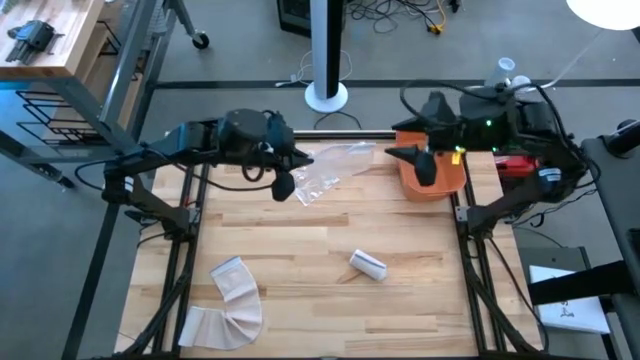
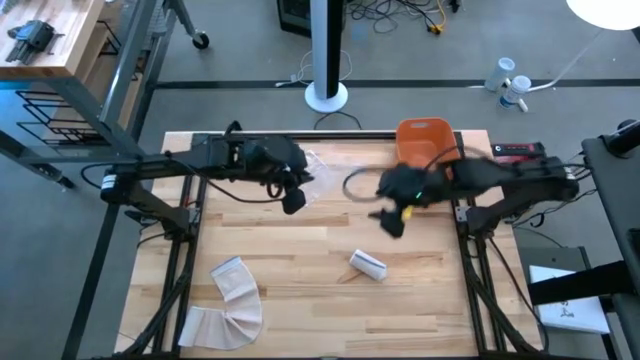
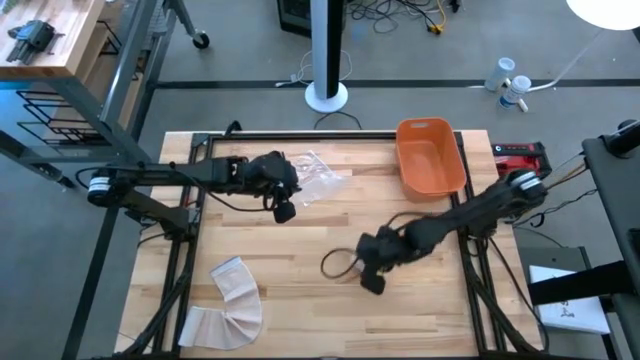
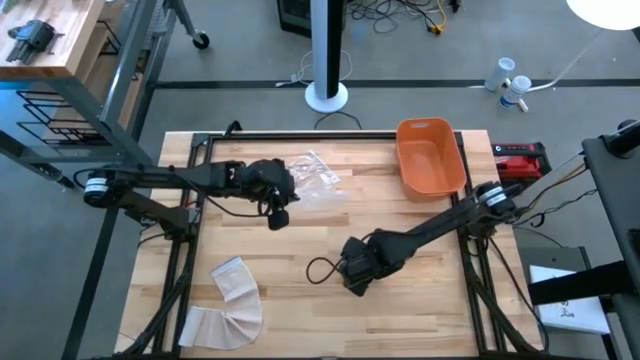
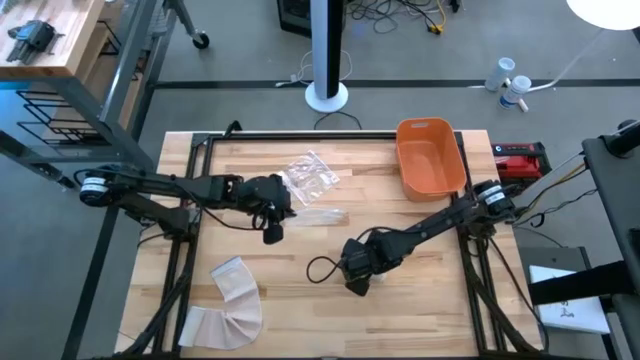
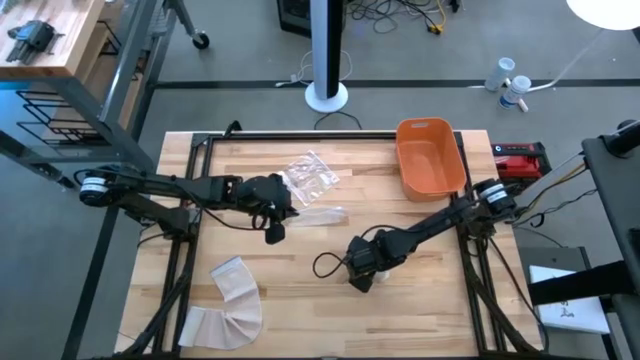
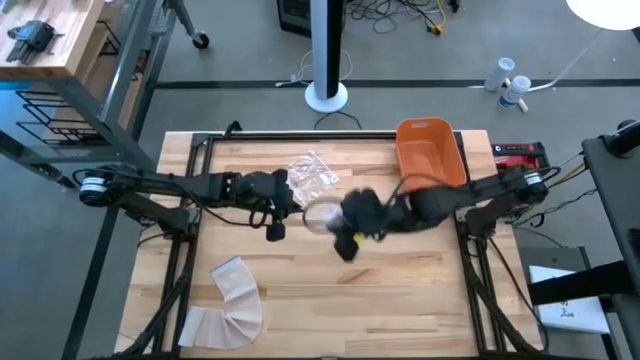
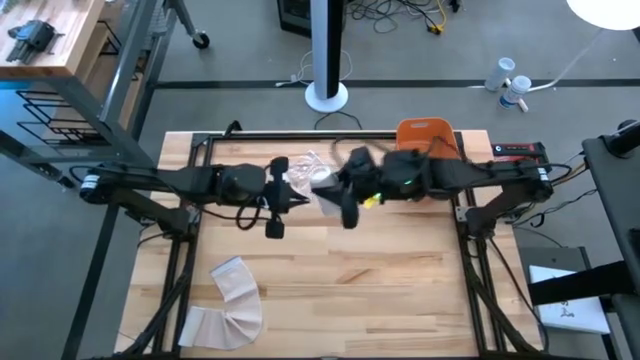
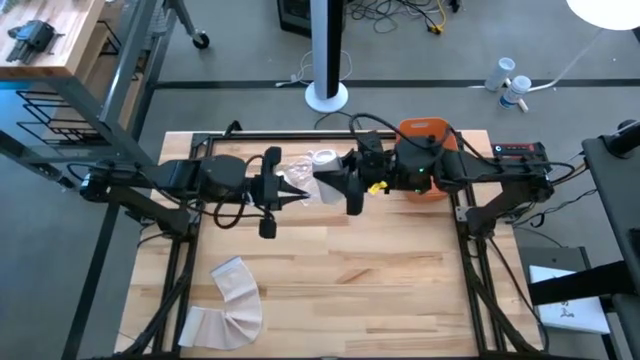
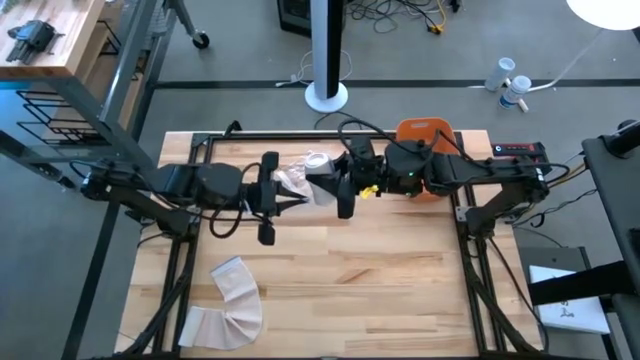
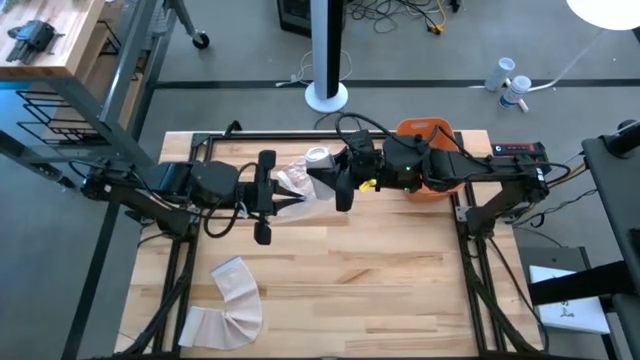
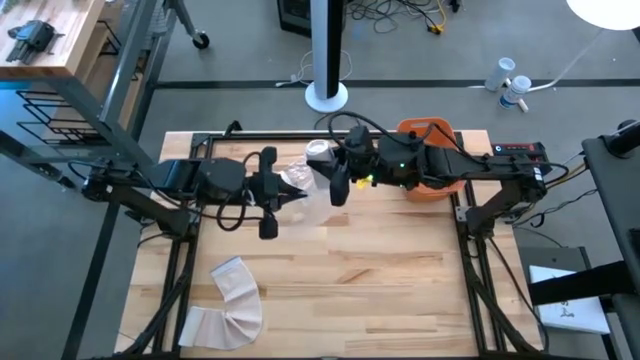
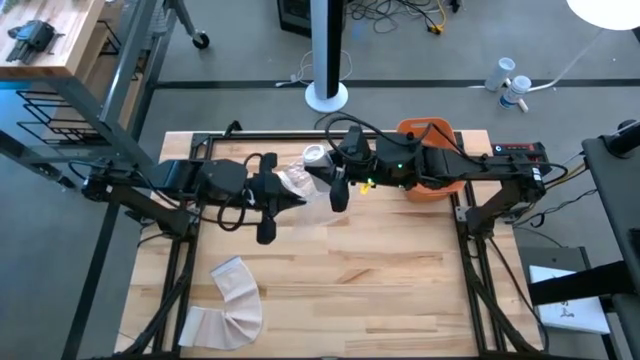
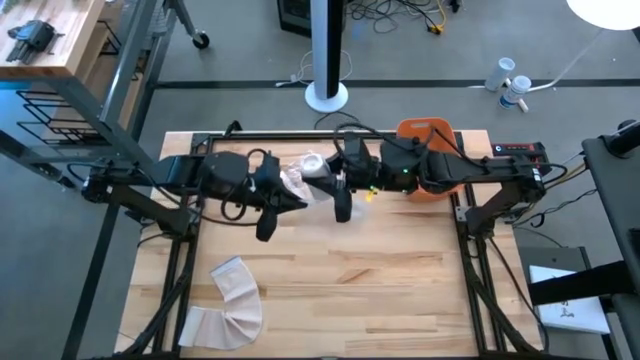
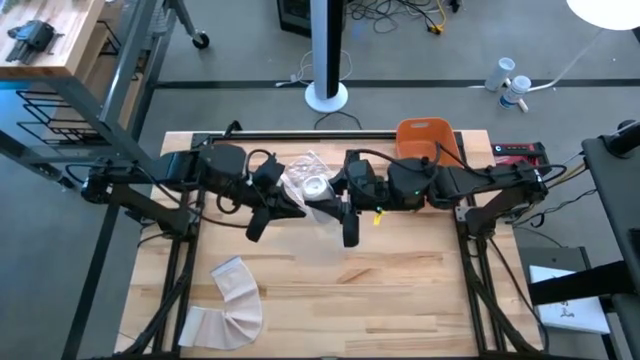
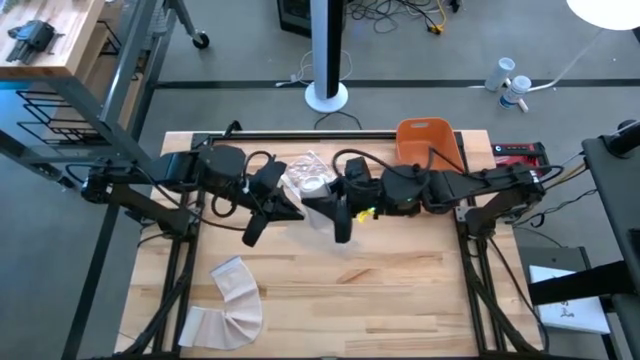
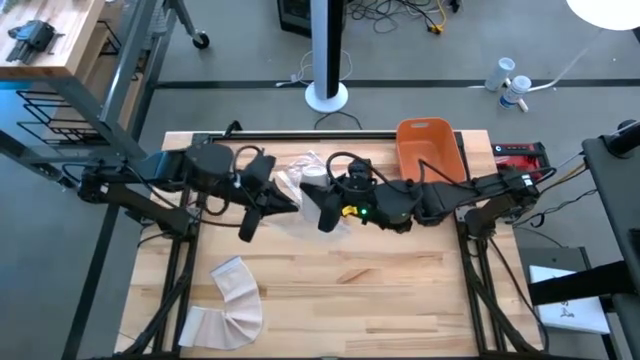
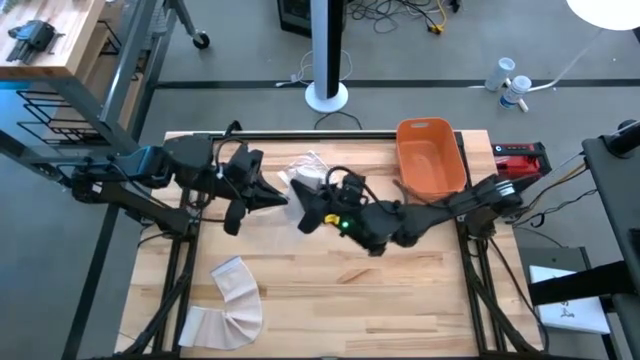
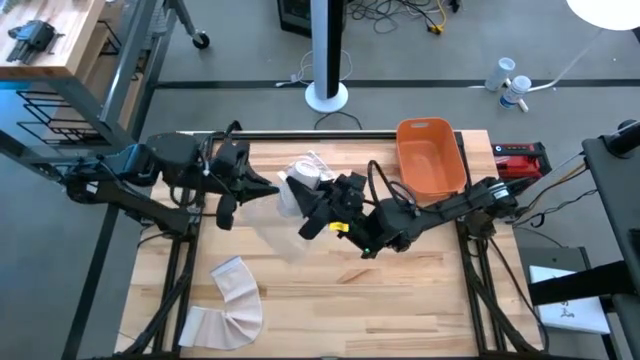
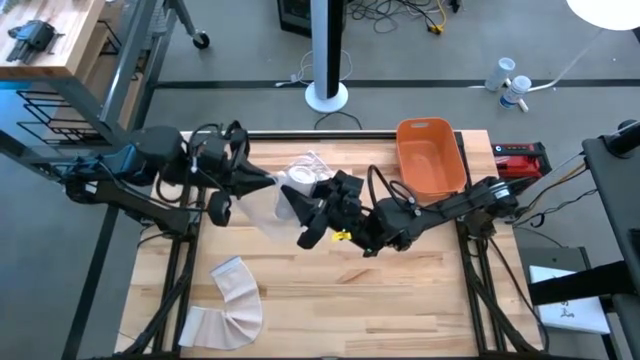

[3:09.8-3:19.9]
Task: Roll bandage
Put the center rolled brown bandage into the transparent zip bag

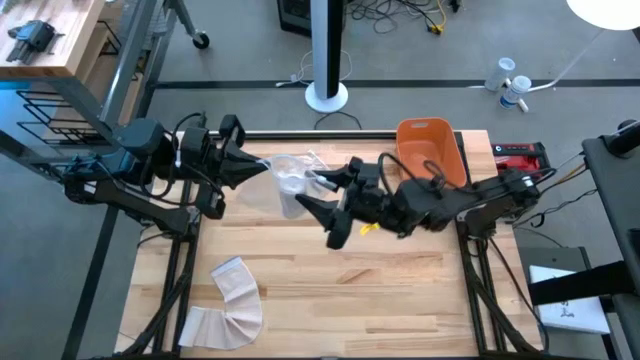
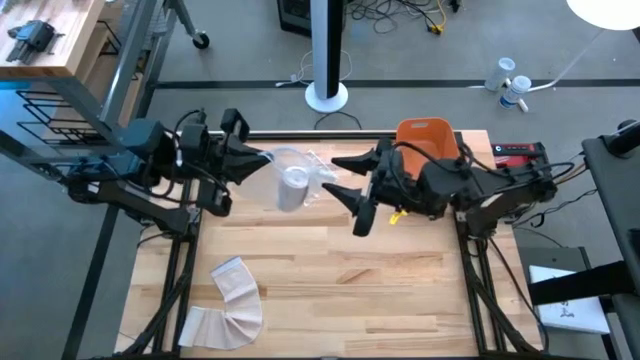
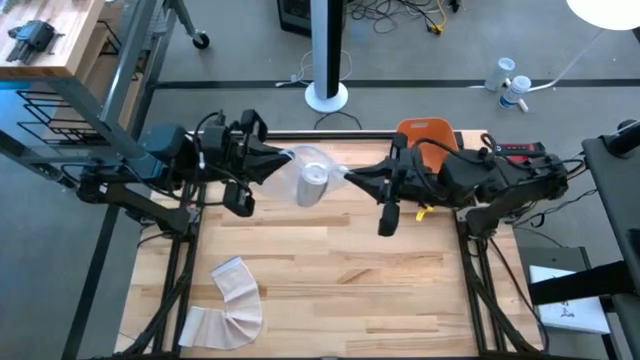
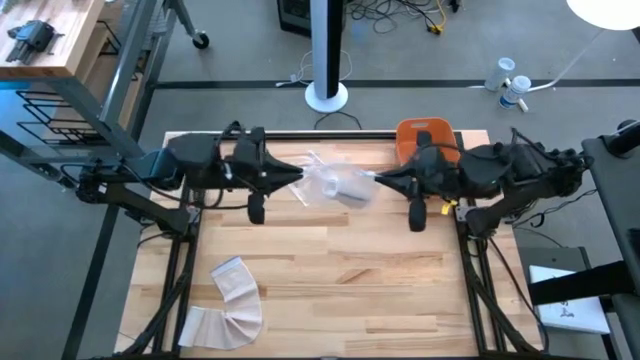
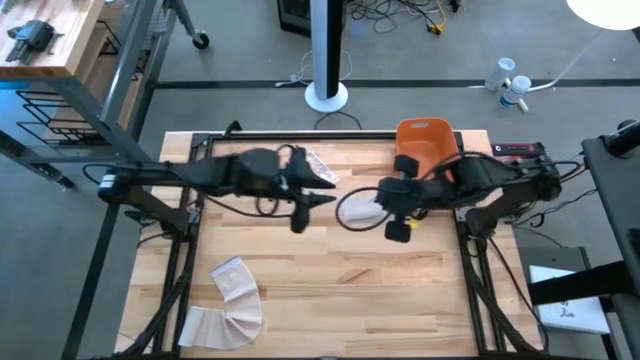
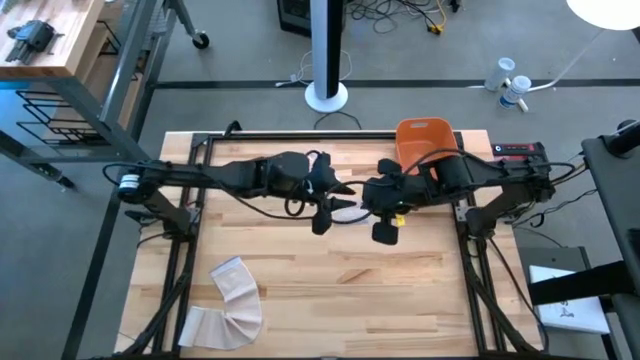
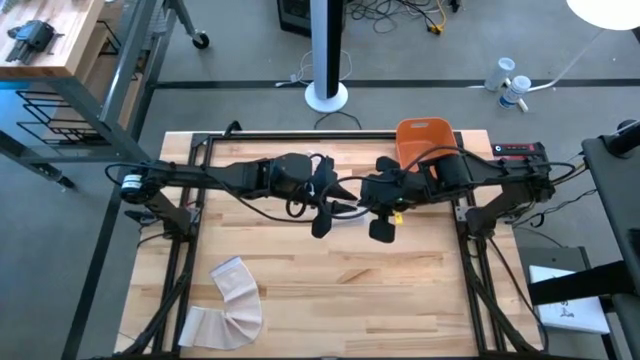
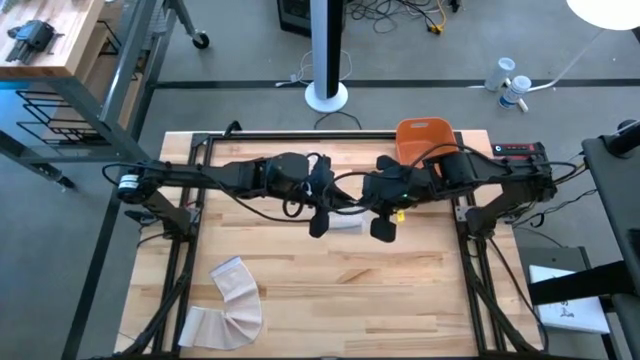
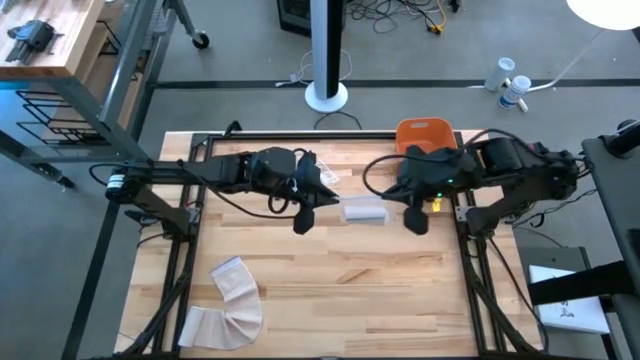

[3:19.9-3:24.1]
Close the transparent zip bag

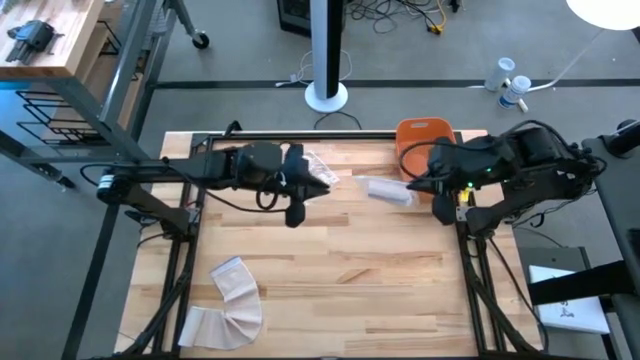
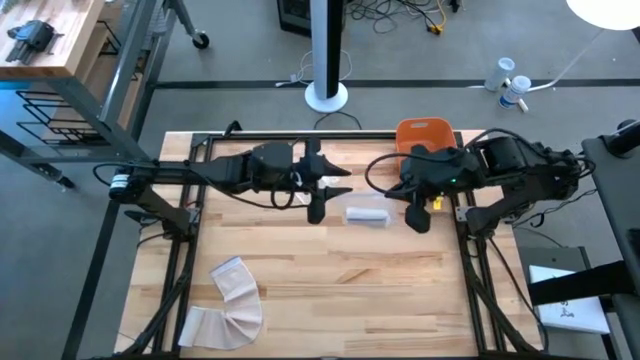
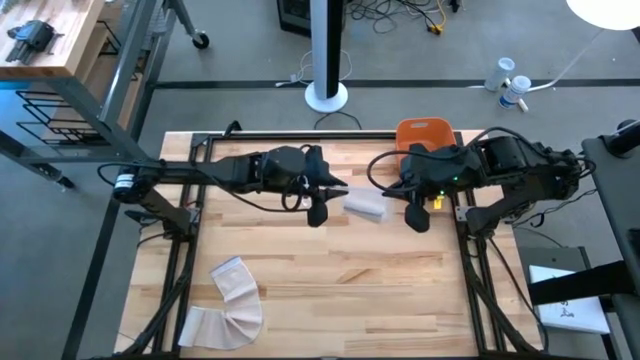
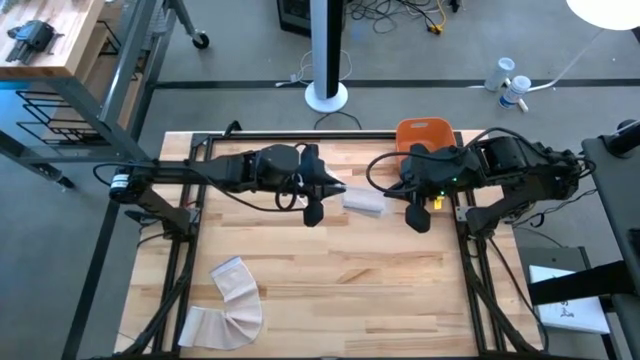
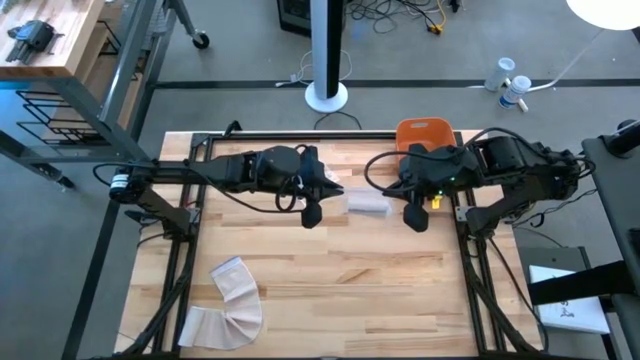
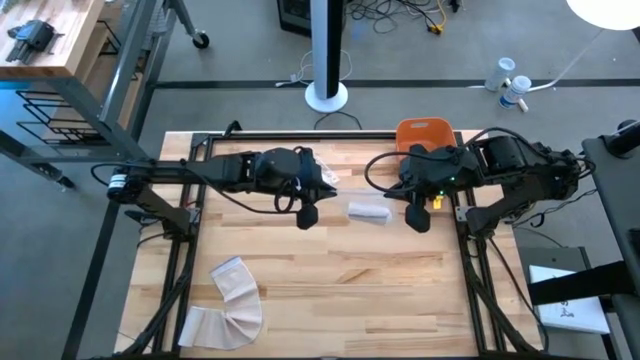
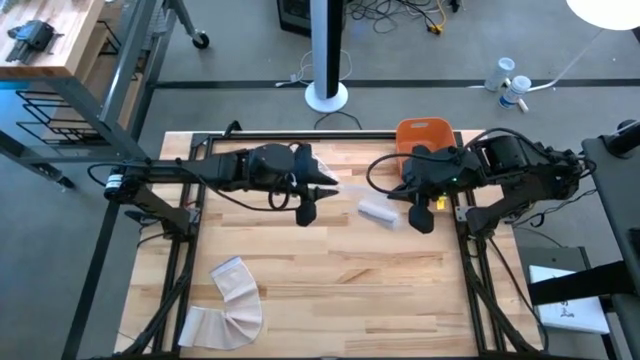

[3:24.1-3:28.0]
Close the transparent zip bag

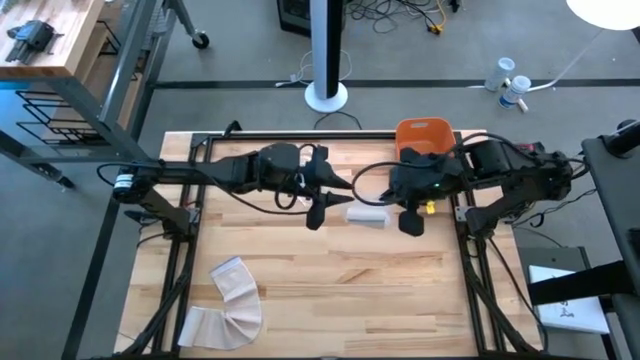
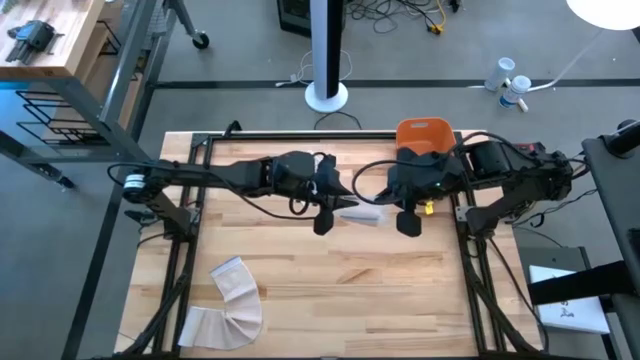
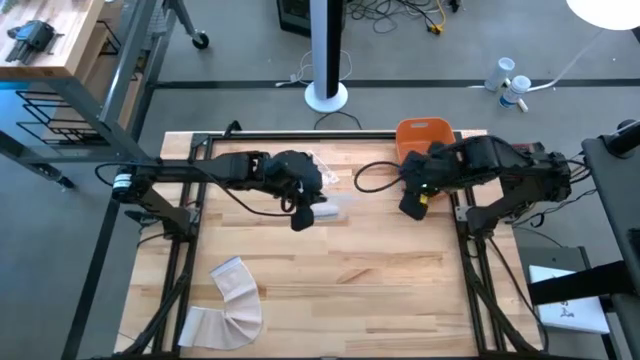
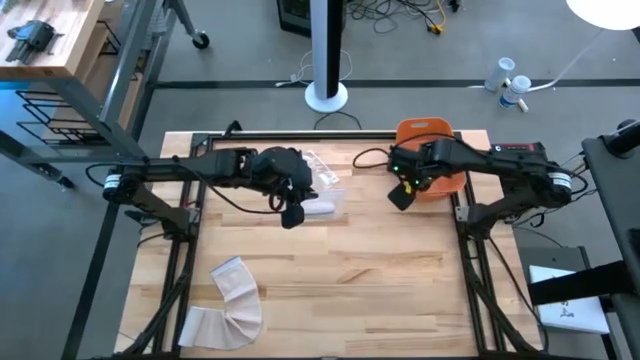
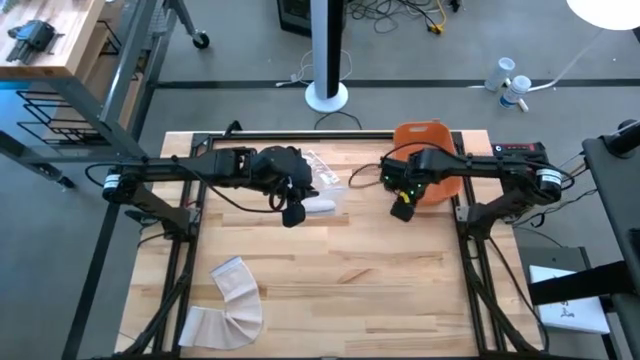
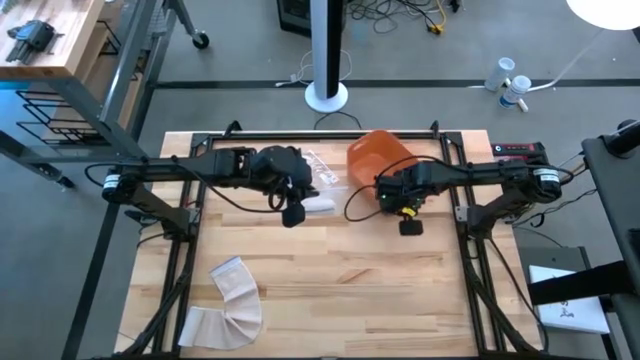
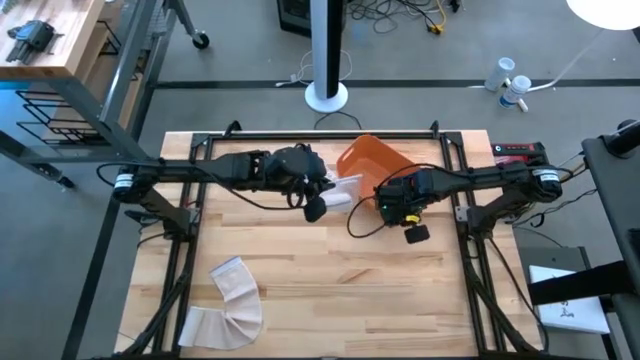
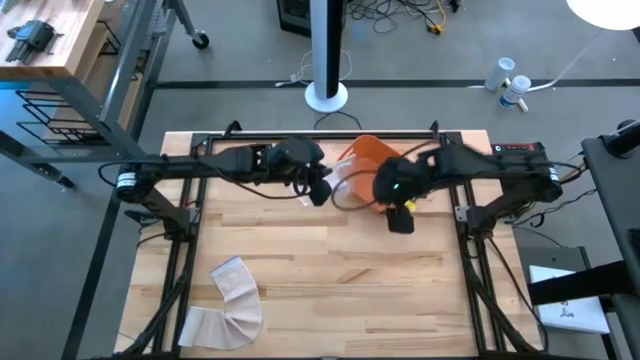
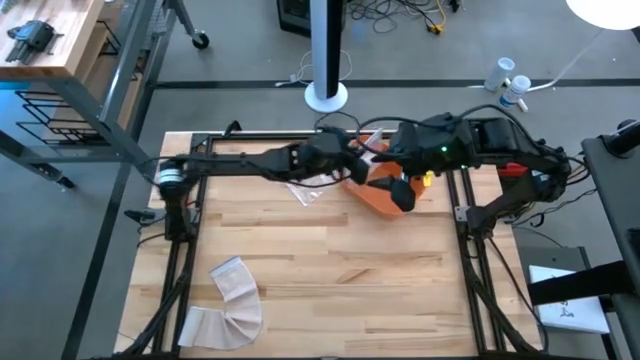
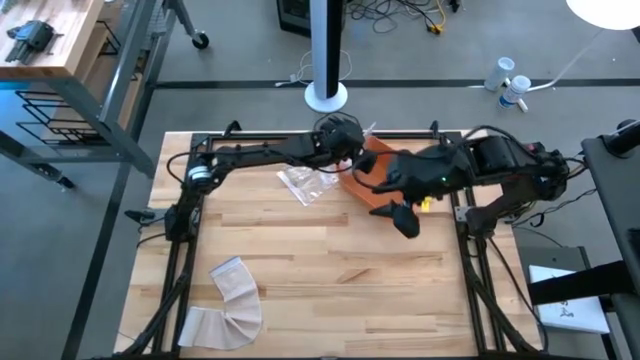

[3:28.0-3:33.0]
Put the transparent zip bag into the orange bin
